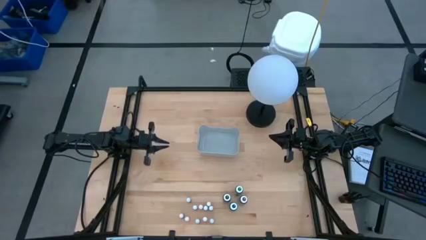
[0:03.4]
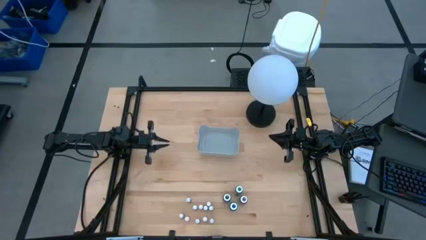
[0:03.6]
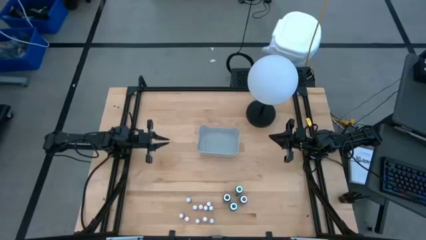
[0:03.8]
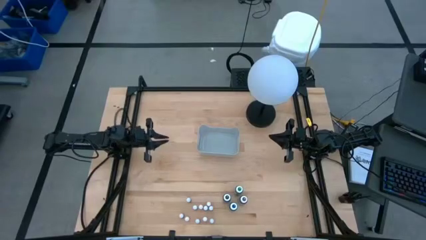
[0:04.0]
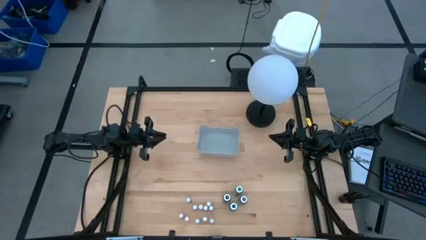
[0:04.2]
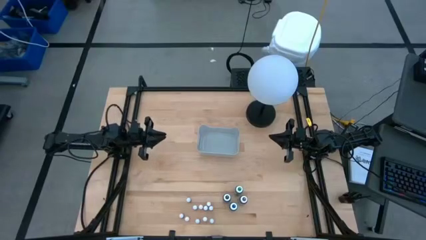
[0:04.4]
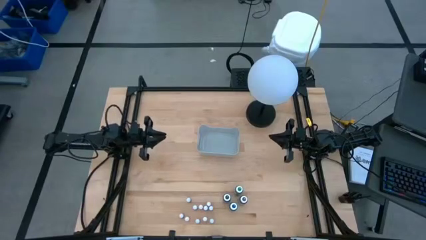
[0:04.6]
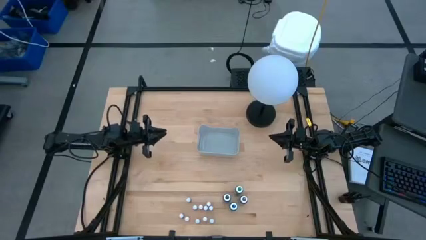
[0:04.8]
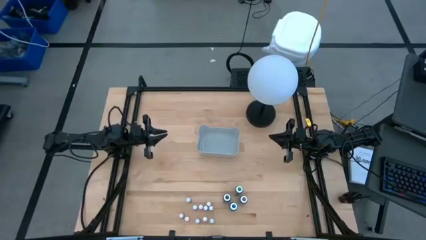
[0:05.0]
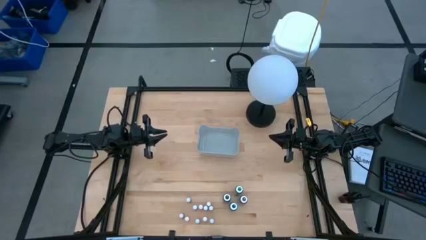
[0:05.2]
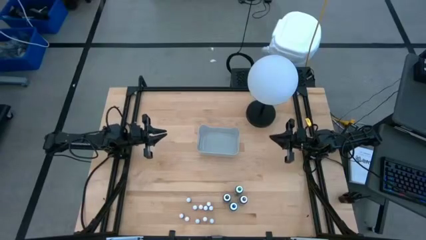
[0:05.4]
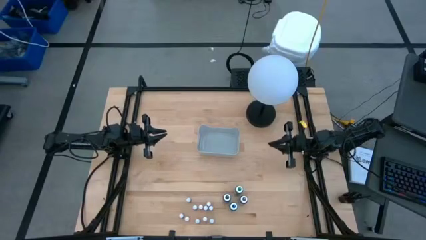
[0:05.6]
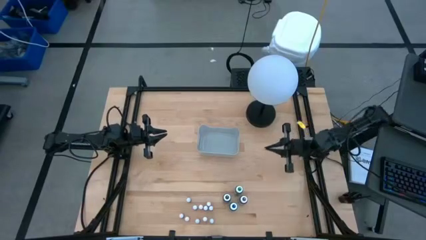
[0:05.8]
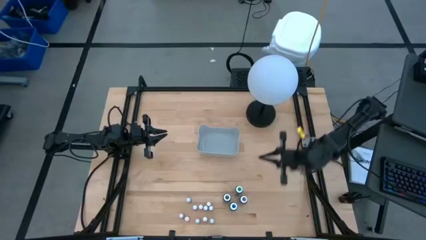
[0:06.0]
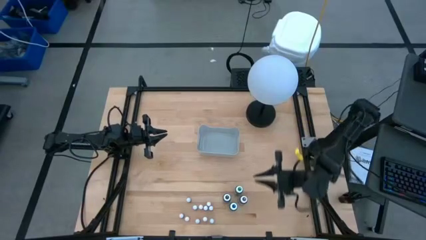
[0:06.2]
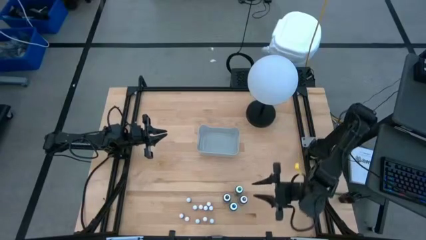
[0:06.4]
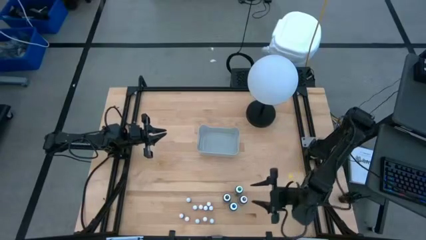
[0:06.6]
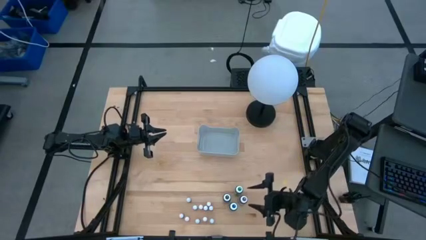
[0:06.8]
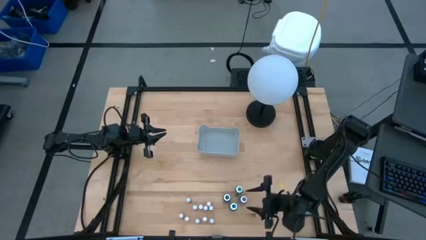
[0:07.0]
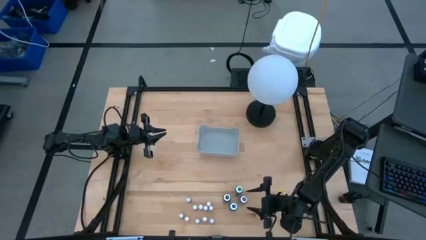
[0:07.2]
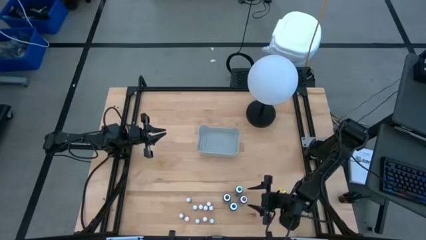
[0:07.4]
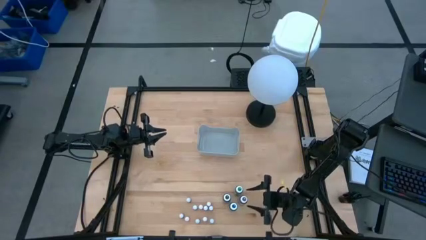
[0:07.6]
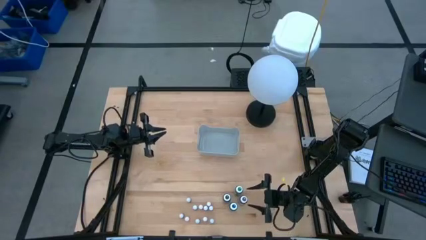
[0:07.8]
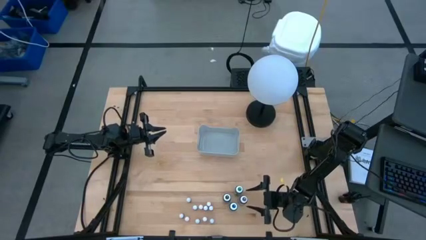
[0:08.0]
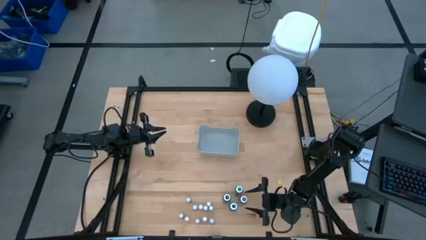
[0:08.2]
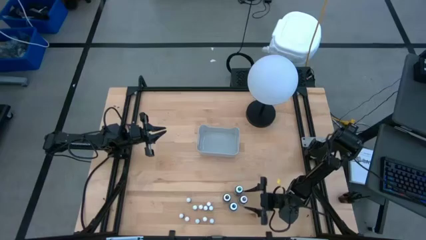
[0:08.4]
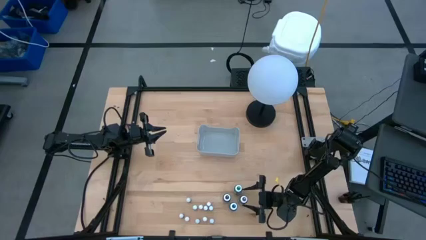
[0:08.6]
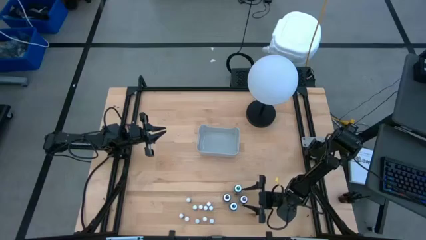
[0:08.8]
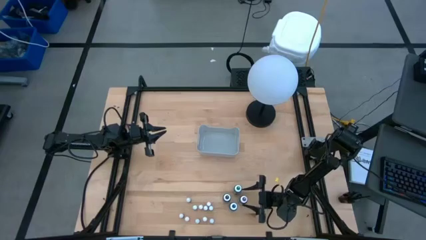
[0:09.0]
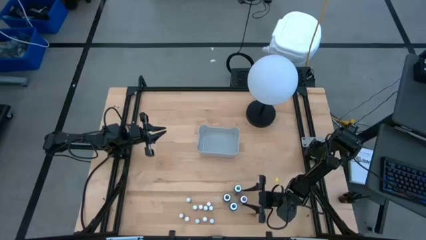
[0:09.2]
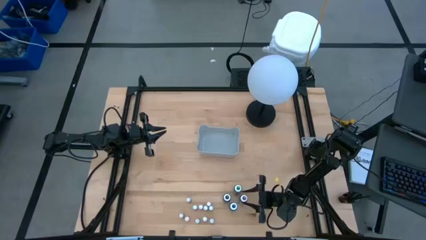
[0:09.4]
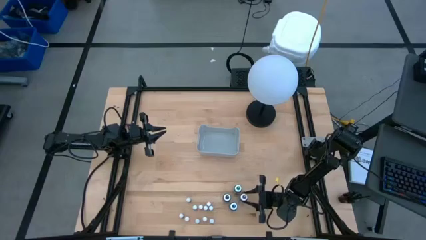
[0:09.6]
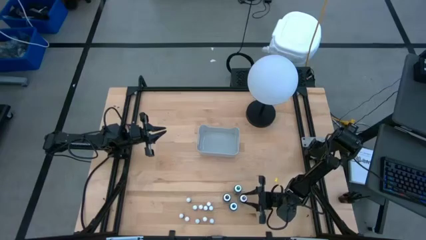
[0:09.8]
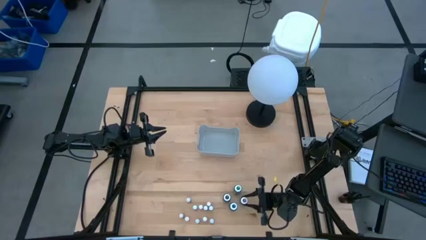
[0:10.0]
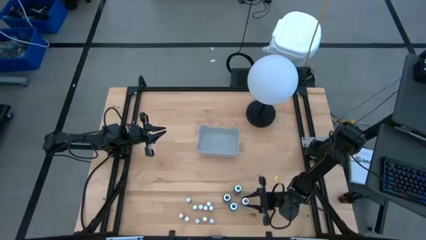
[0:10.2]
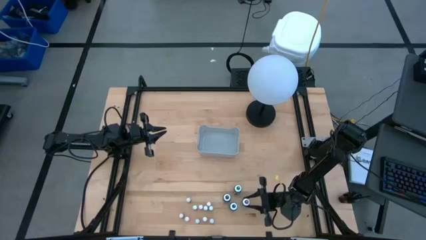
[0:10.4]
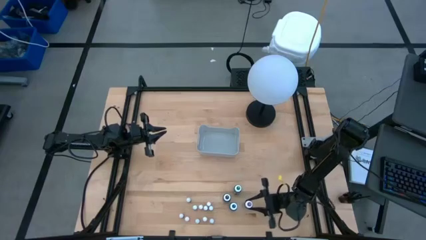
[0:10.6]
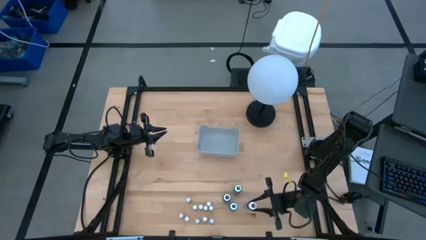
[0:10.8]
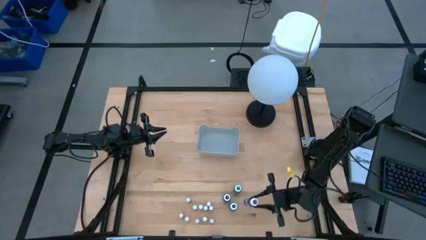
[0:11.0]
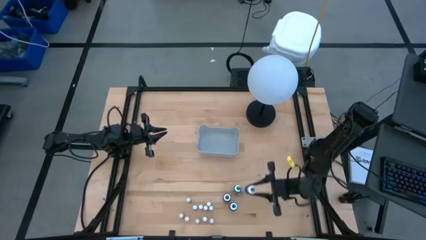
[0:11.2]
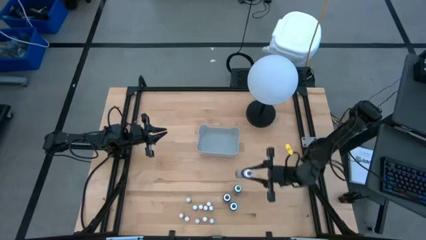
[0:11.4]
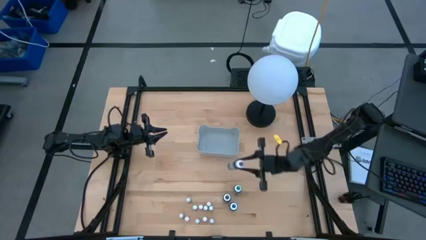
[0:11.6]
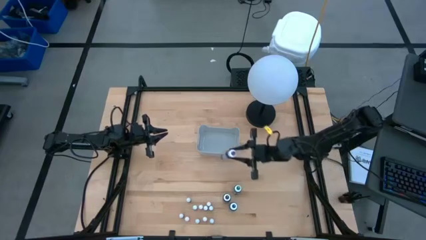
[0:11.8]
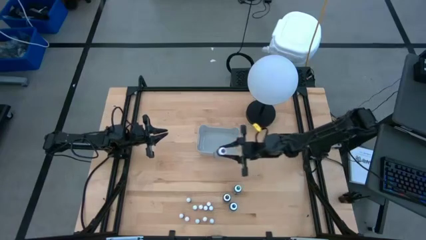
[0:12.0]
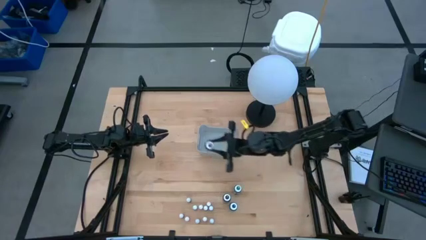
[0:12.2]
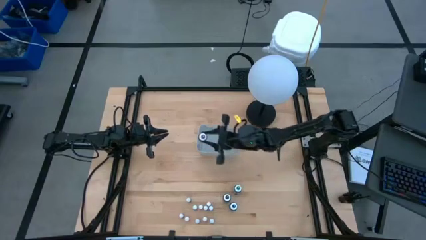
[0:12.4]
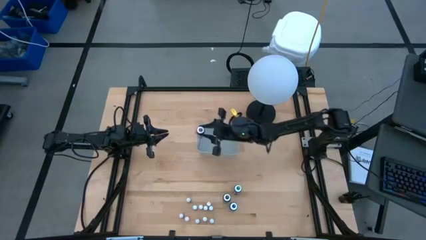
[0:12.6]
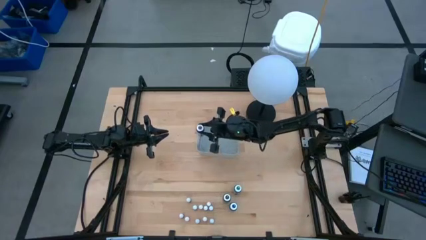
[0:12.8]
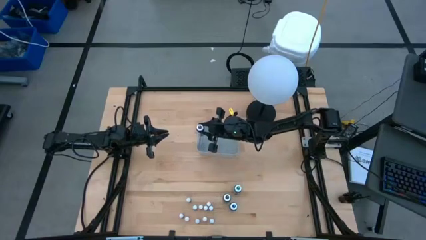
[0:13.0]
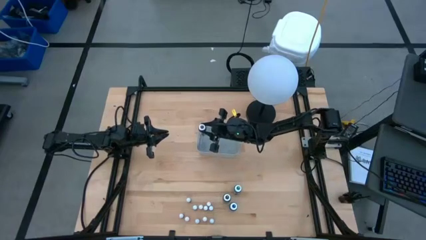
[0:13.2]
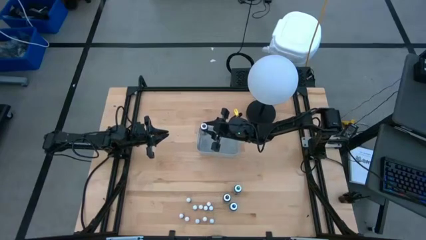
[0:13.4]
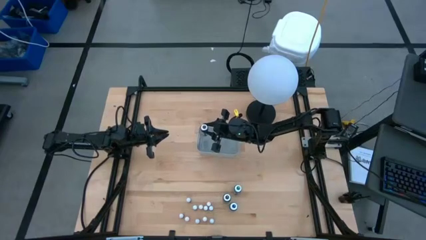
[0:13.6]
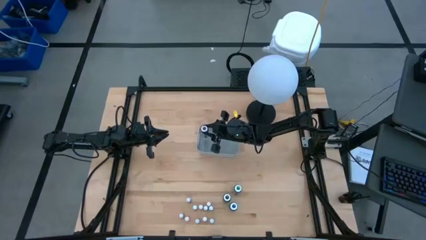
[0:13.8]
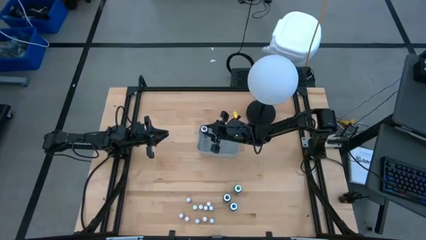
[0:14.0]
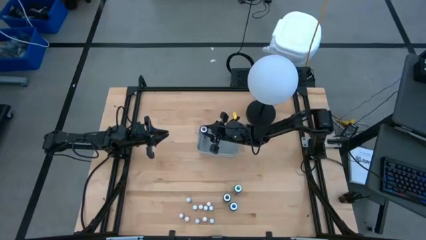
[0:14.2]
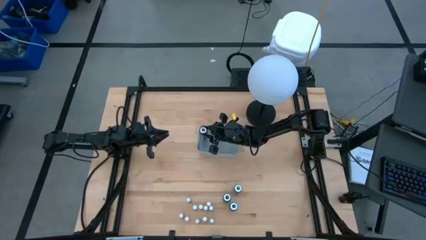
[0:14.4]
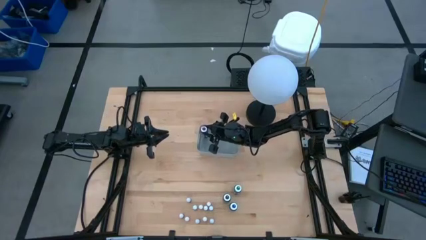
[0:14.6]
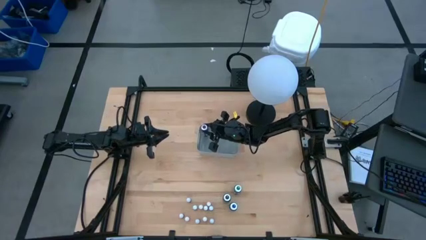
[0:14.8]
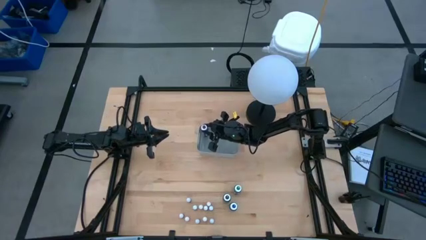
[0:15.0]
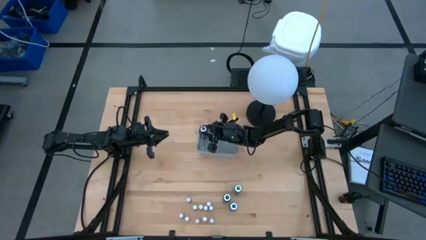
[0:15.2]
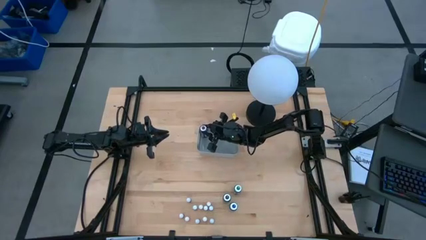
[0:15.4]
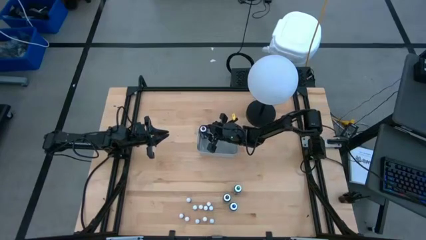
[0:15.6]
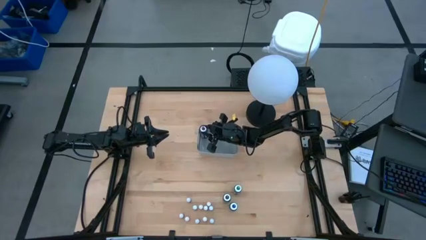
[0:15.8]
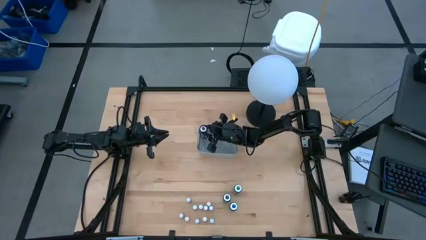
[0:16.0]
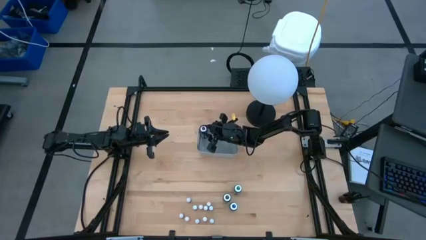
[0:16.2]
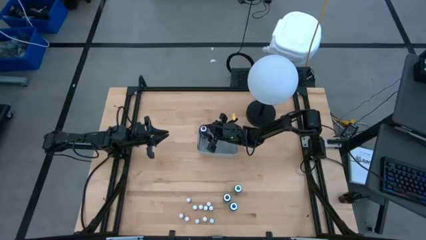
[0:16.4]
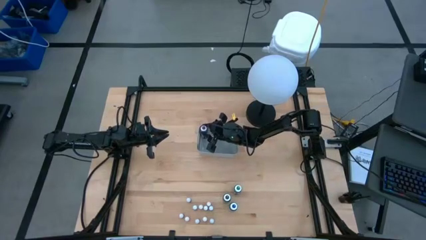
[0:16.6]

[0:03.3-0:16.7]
Task: Pick & Place food coloring
Put the large purple food coloring bottle into the gray bin

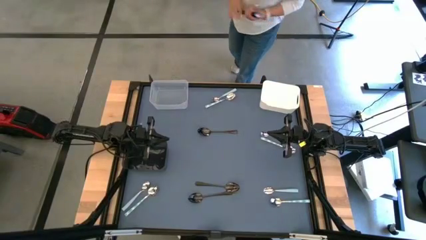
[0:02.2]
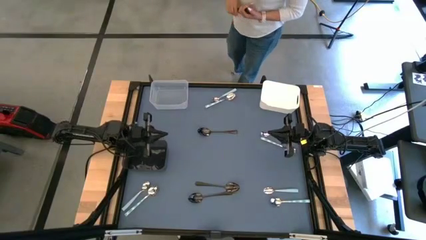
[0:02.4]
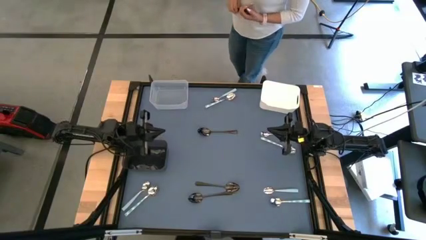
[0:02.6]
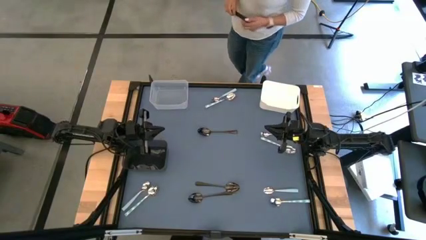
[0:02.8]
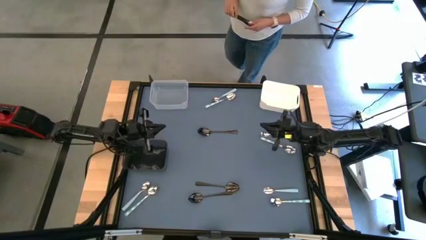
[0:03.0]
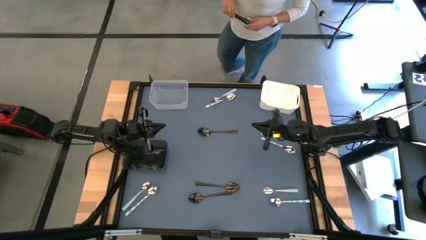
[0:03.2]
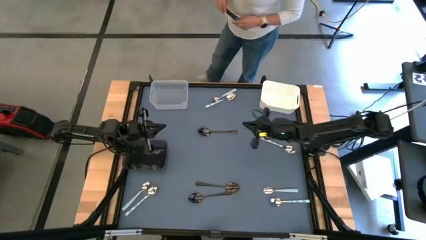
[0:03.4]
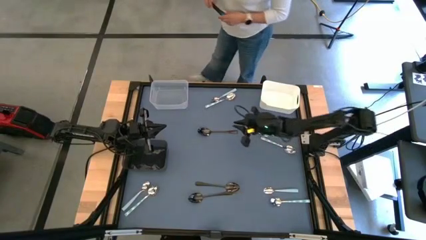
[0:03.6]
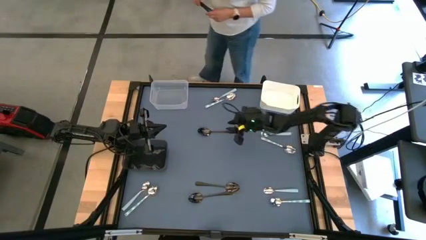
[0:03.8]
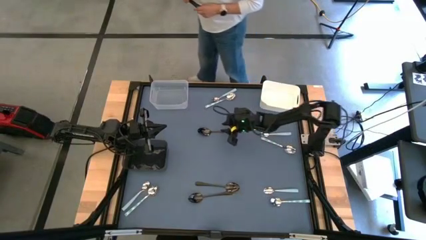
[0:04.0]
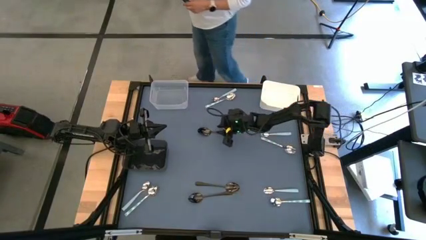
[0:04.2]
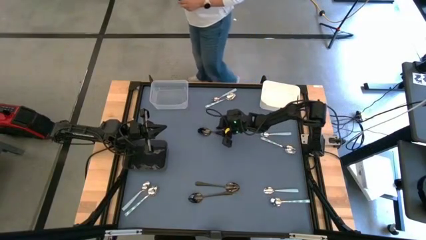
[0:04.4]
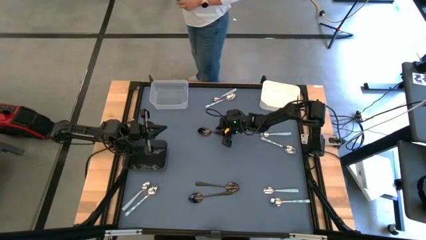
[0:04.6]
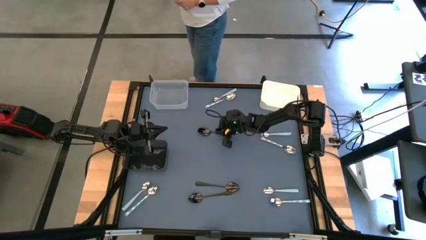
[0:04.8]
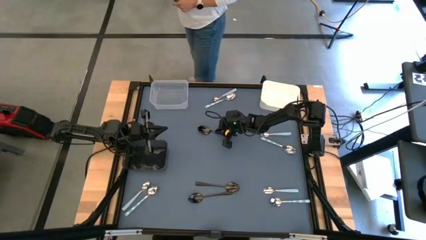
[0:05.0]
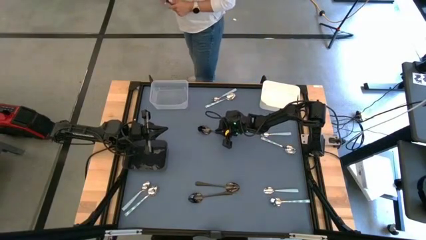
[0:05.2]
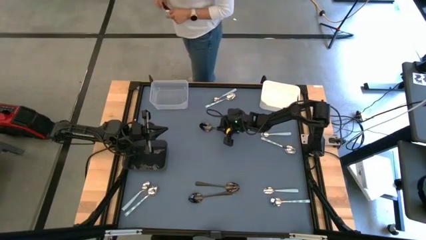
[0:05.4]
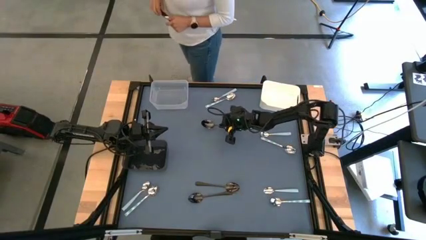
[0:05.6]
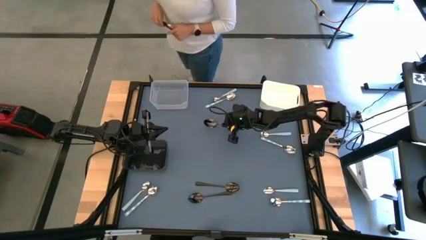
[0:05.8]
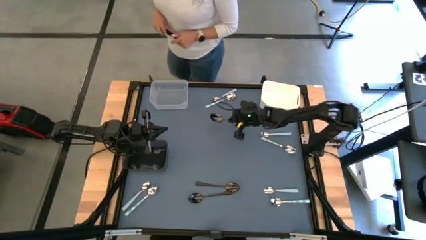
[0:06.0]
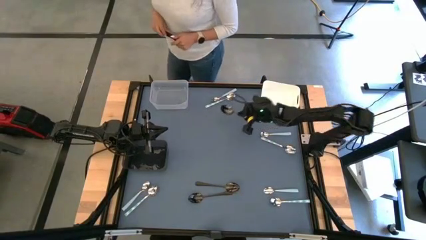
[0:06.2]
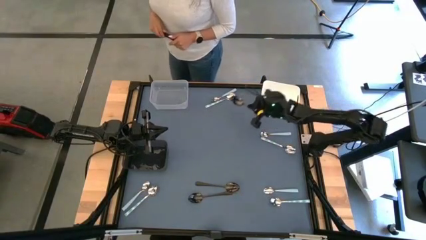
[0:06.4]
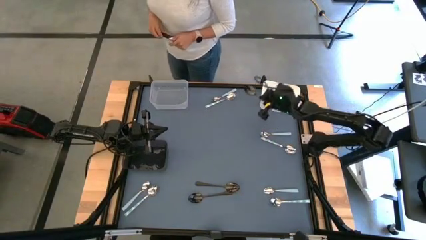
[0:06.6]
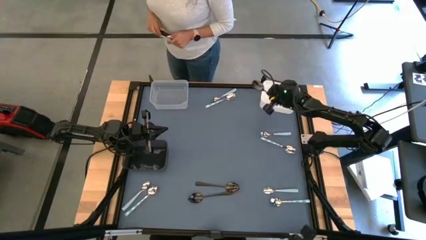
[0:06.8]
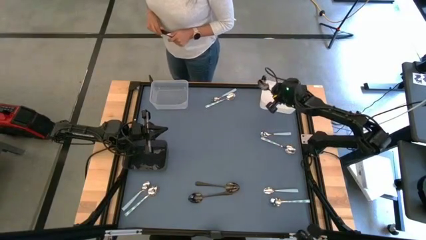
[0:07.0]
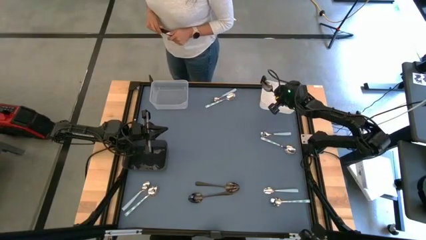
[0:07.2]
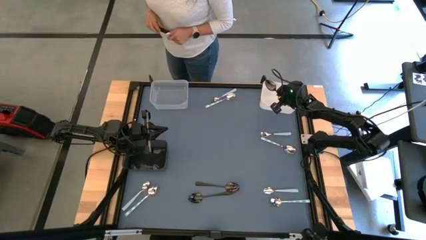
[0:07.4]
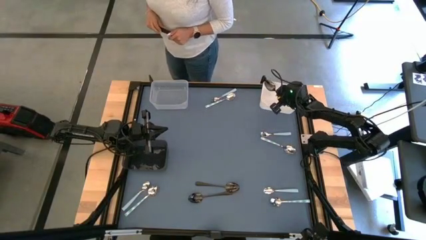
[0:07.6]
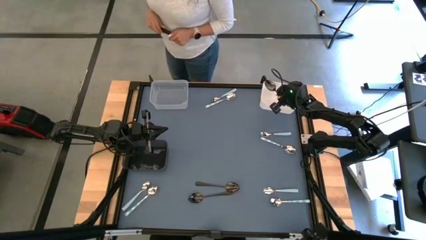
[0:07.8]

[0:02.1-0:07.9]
Task: Sort silverware by color (type)
Put the black spoon into the white bin
